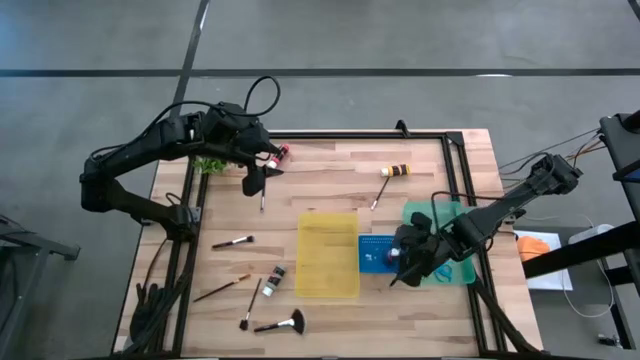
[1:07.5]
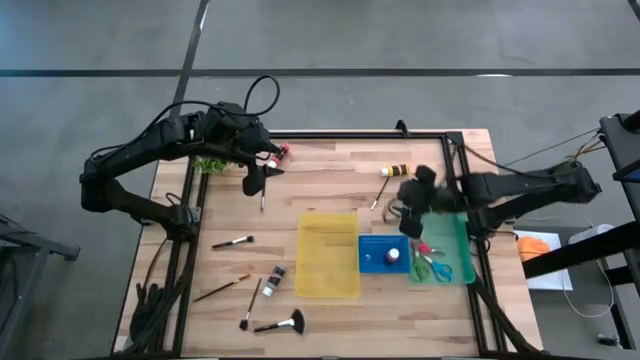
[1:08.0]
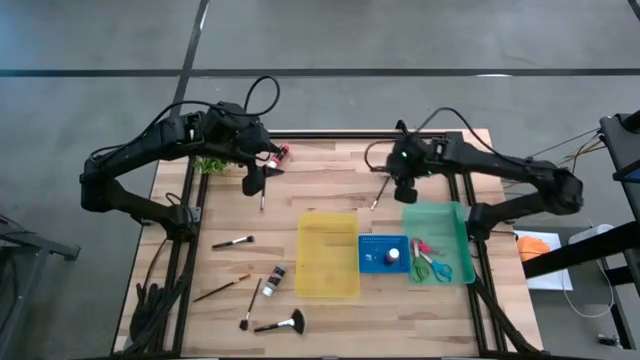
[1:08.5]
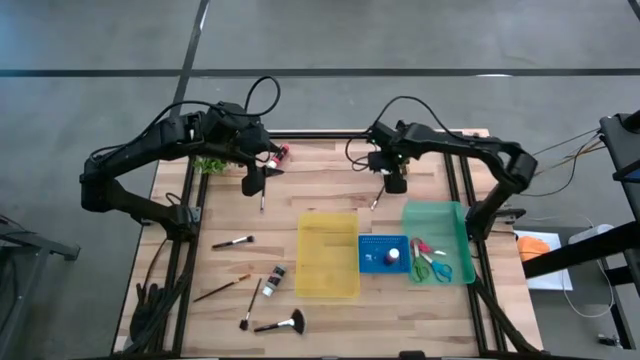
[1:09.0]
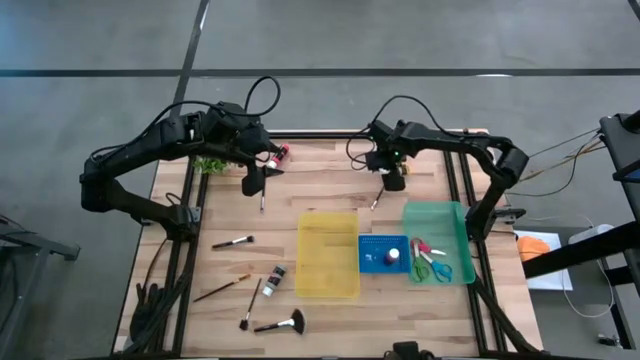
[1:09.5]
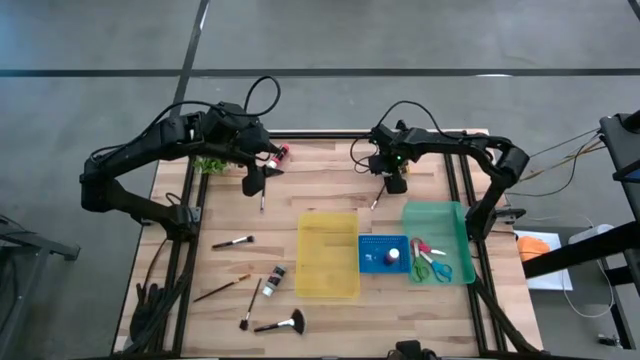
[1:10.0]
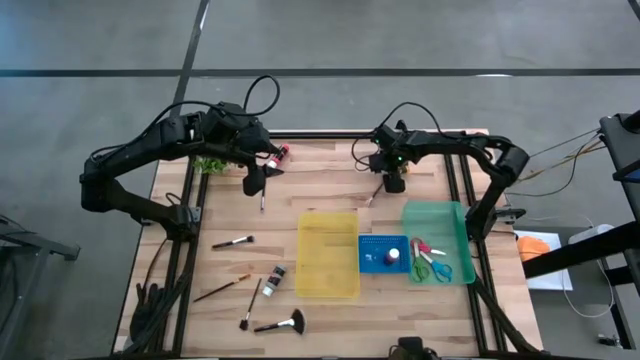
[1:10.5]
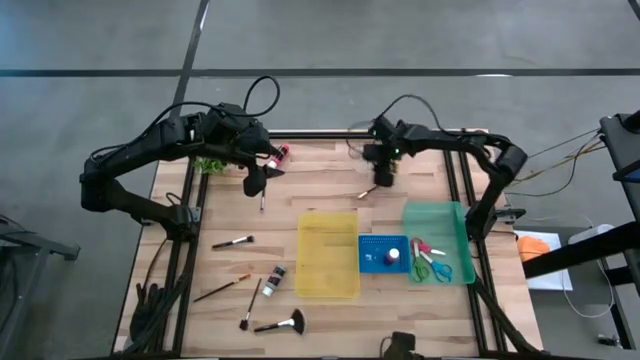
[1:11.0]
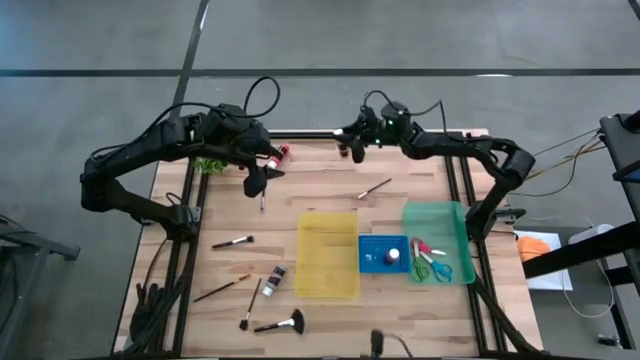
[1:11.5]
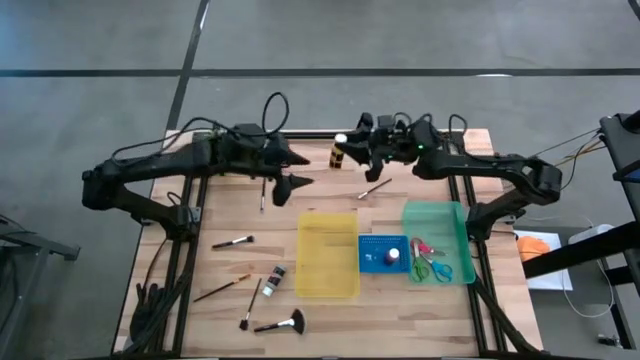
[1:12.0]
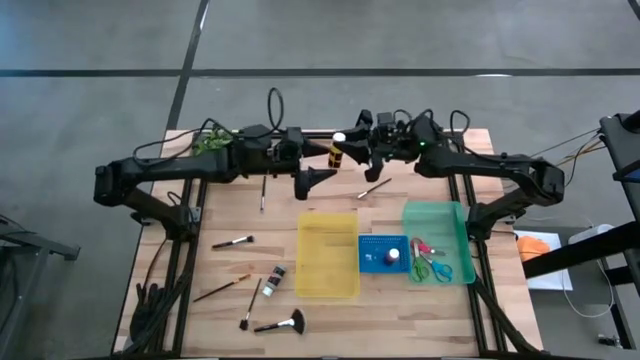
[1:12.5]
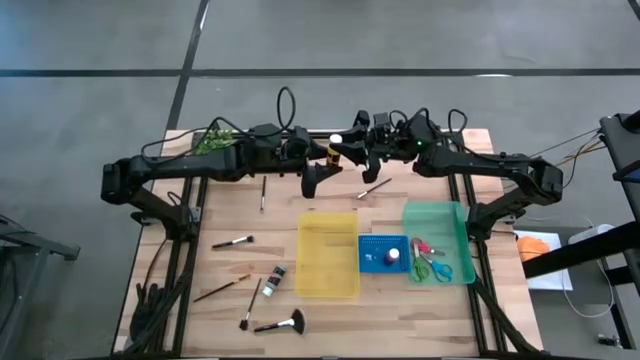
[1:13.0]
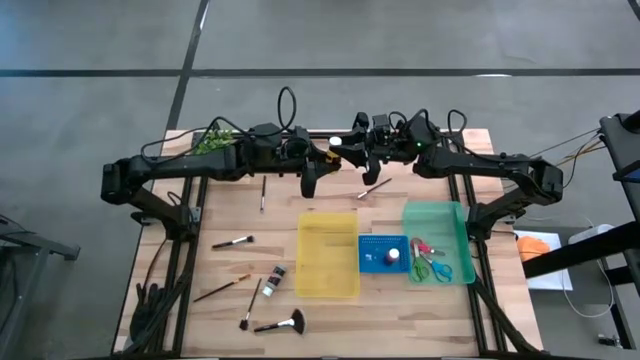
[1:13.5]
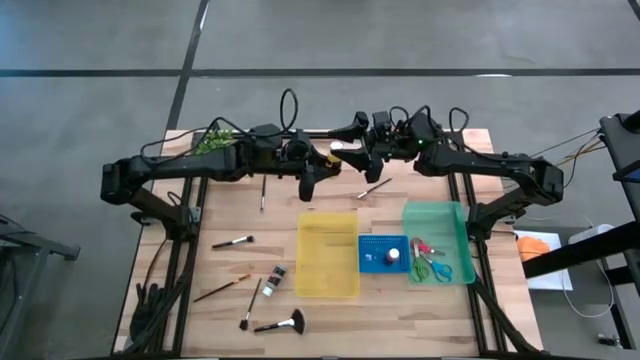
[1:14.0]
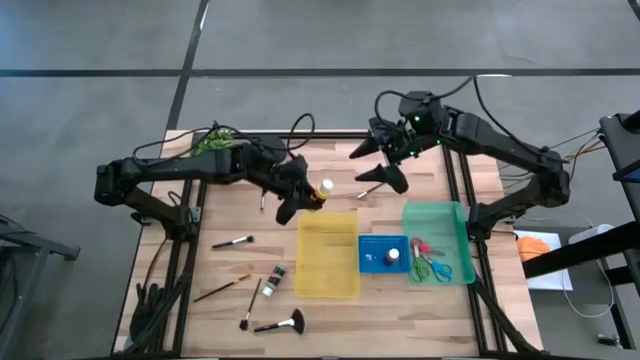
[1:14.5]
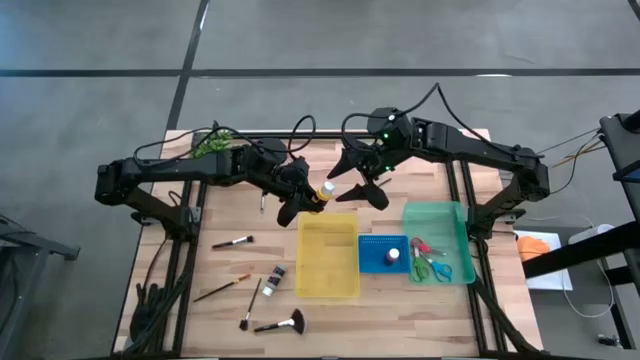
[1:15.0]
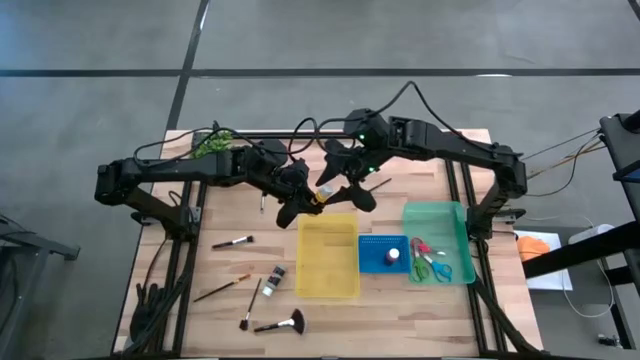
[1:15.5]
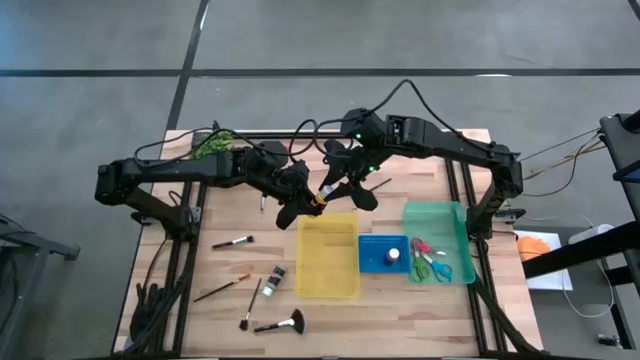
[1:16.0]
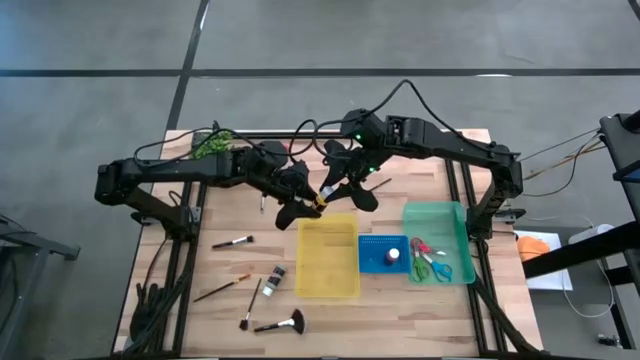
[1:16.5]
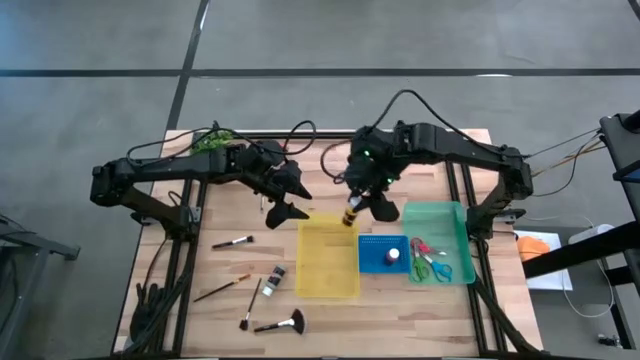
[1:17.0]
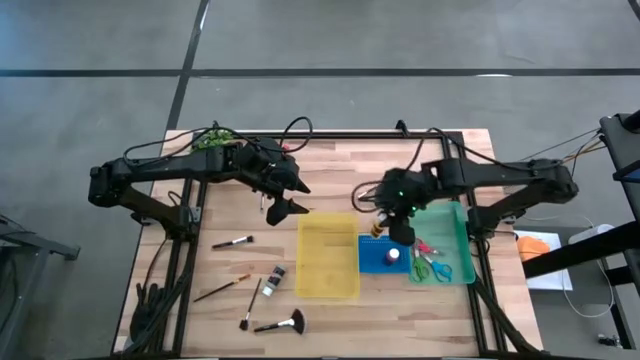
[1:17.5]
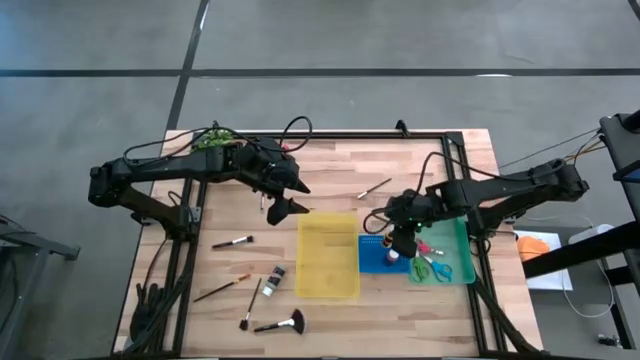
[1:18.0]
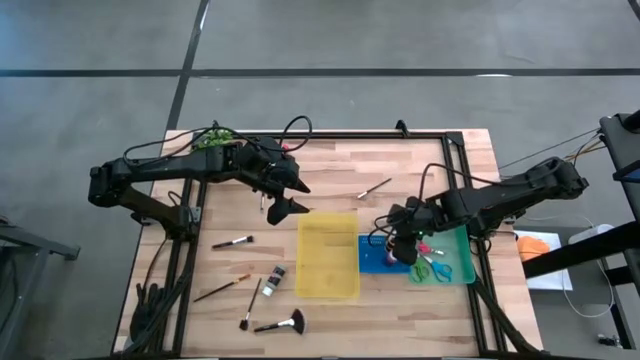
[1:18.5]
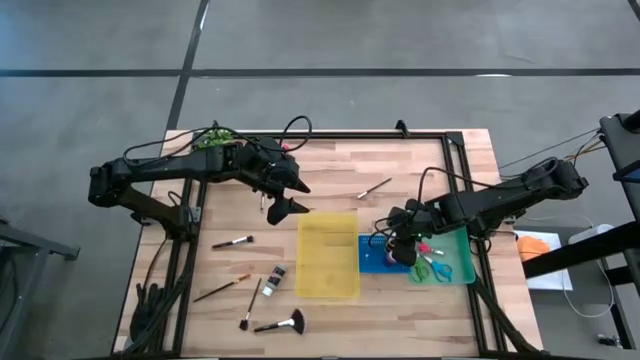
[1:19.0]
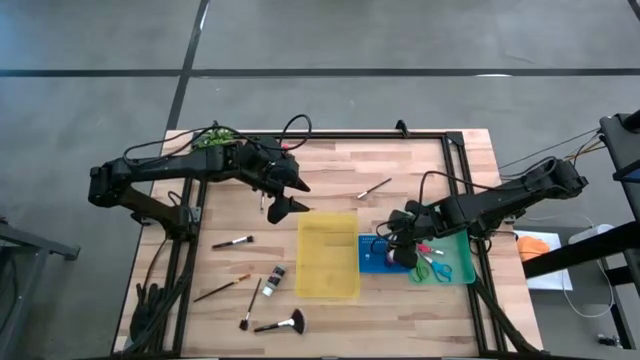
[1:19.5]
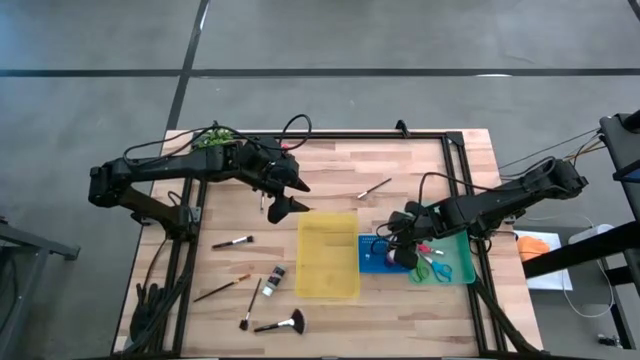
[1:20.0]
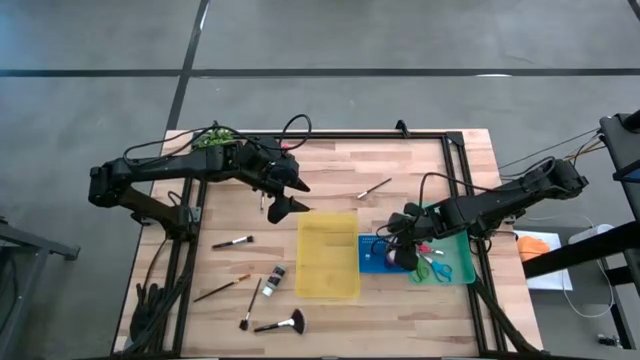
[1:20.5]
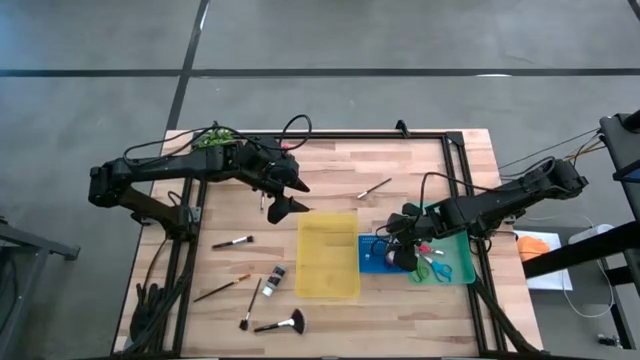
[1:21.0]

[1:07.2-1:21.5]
Task: Pick & Place Paint Supplies
Put the yellow paint bottle into the blue bin

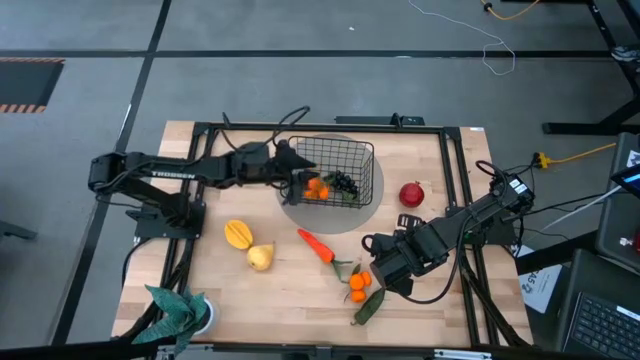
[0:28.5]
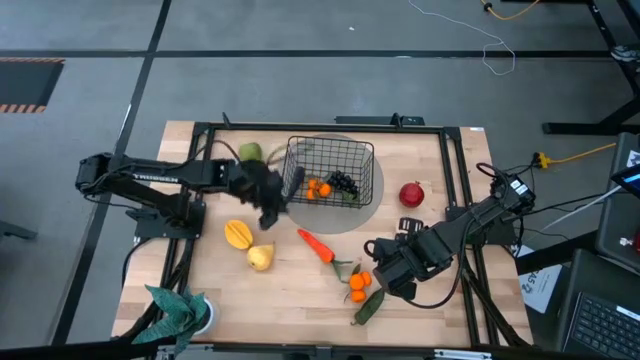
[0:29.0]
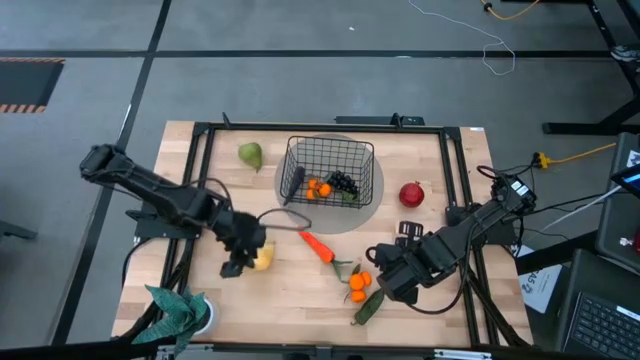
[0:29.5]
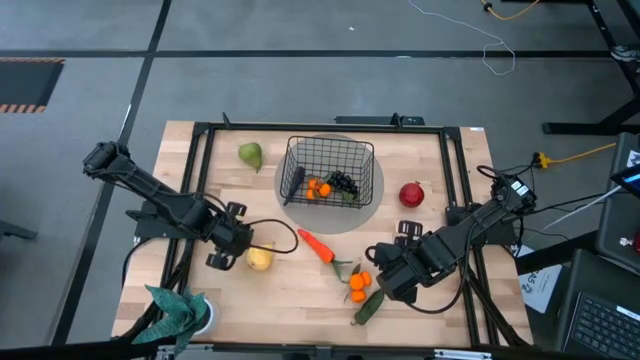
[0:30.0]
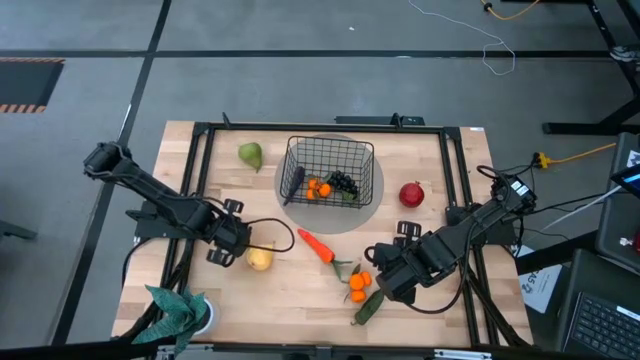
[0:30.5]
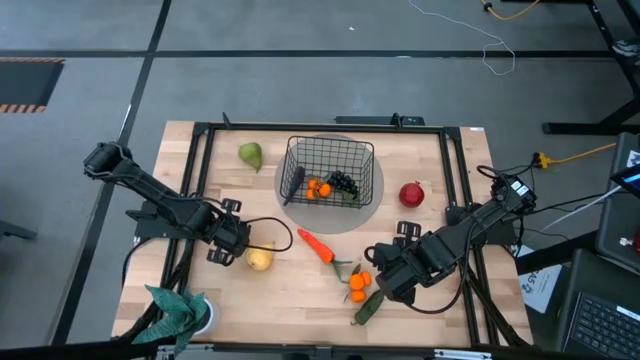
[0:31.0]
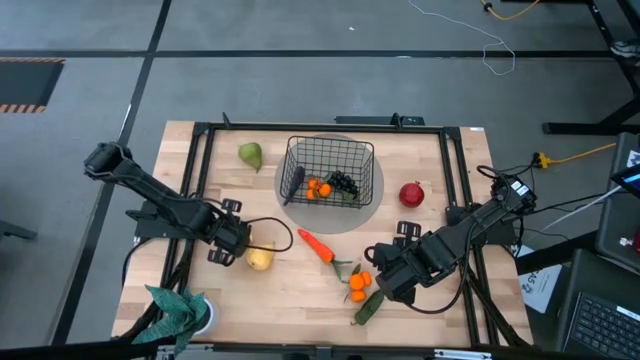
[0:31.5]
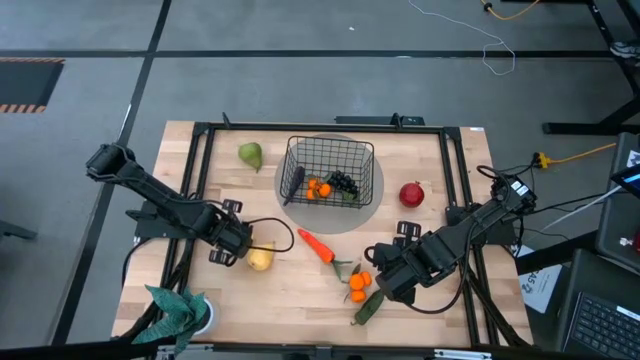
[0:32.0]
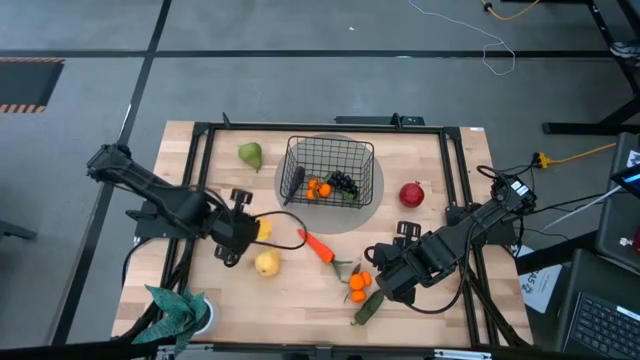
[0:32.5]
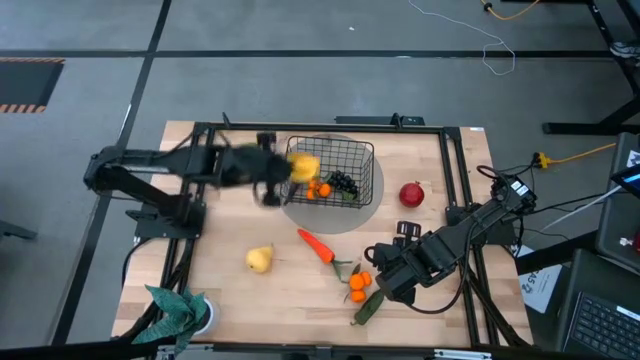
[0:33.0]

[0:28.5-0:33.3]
Task: Build produce basket
Put the yellow starfruit into the black wire basket
